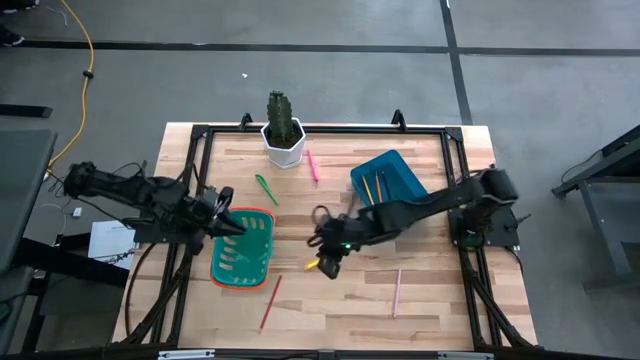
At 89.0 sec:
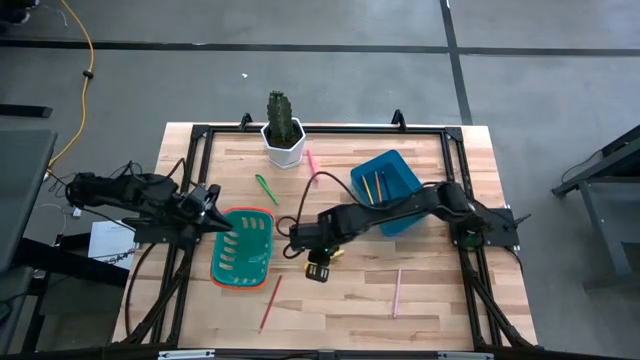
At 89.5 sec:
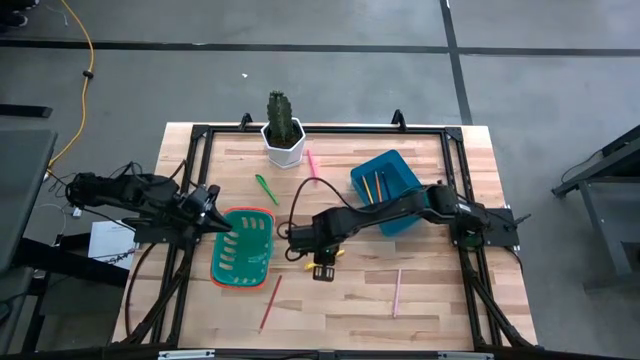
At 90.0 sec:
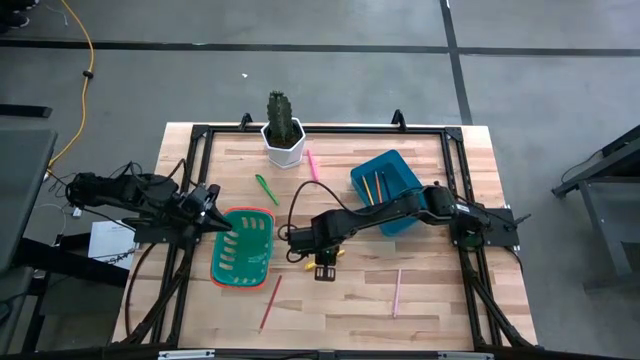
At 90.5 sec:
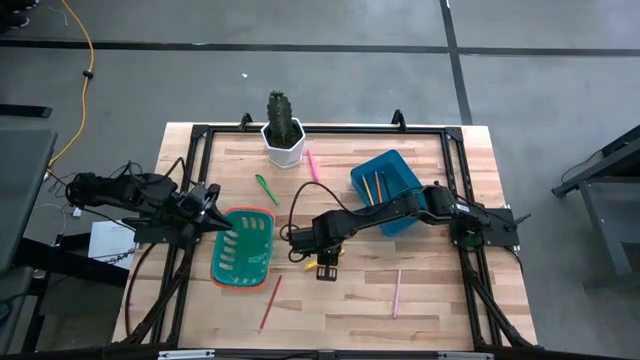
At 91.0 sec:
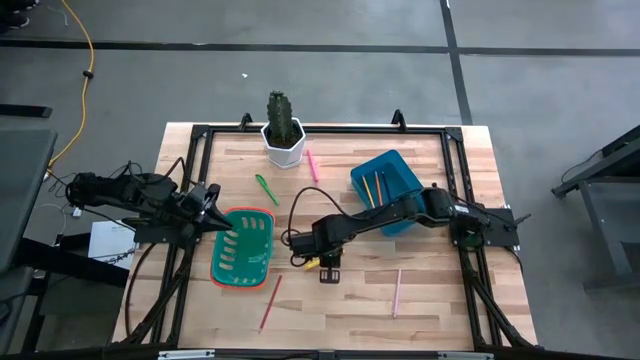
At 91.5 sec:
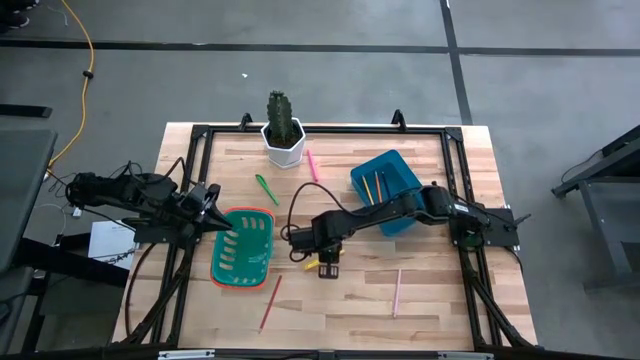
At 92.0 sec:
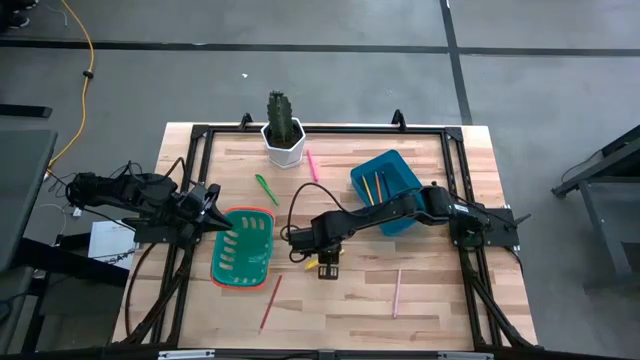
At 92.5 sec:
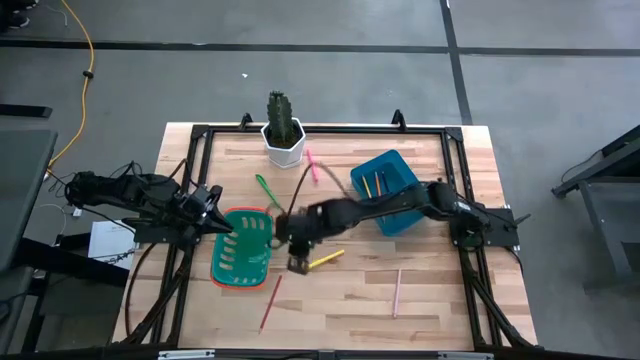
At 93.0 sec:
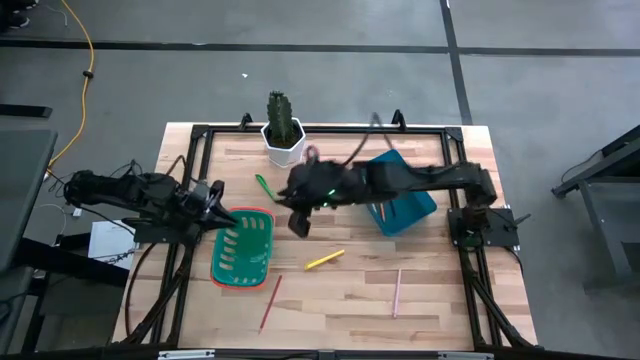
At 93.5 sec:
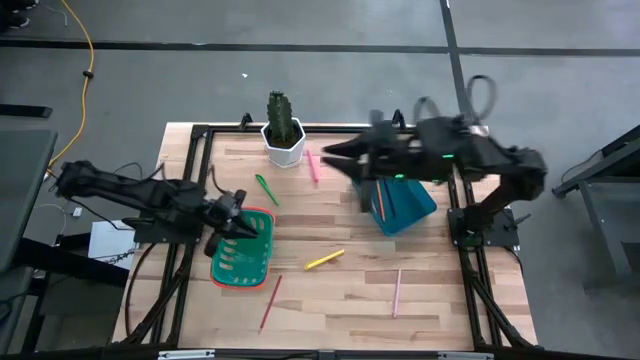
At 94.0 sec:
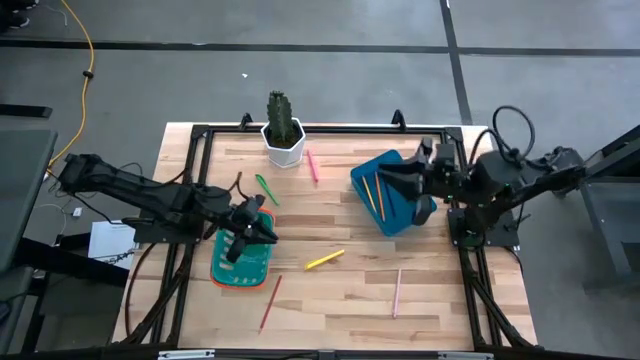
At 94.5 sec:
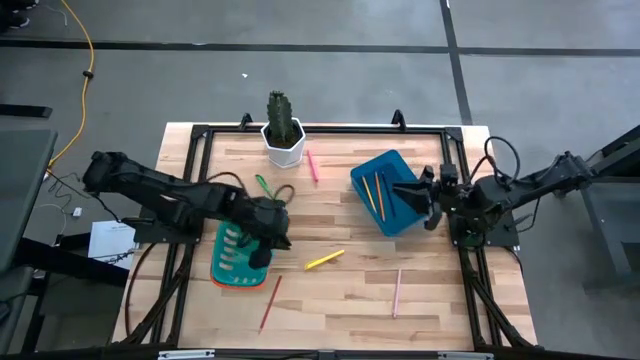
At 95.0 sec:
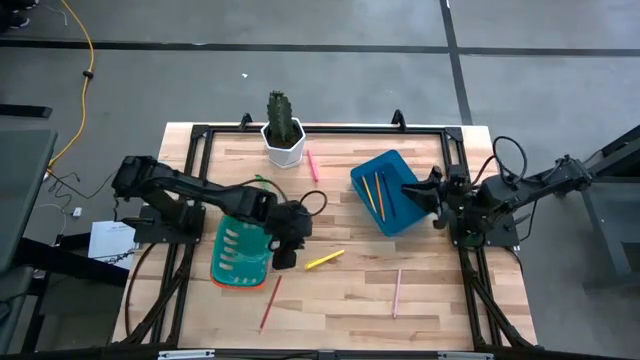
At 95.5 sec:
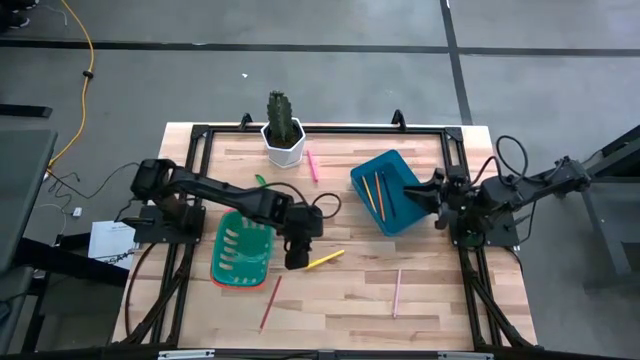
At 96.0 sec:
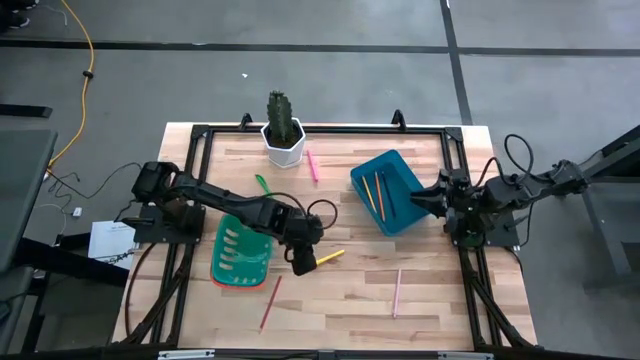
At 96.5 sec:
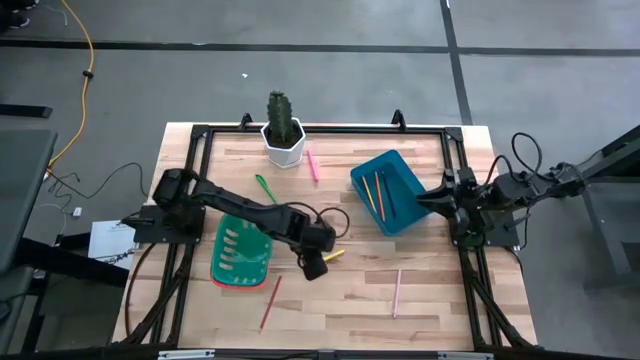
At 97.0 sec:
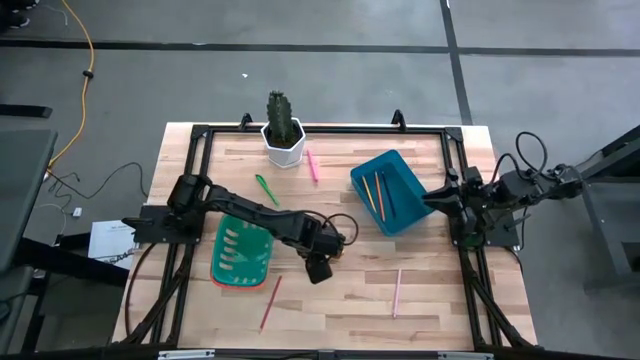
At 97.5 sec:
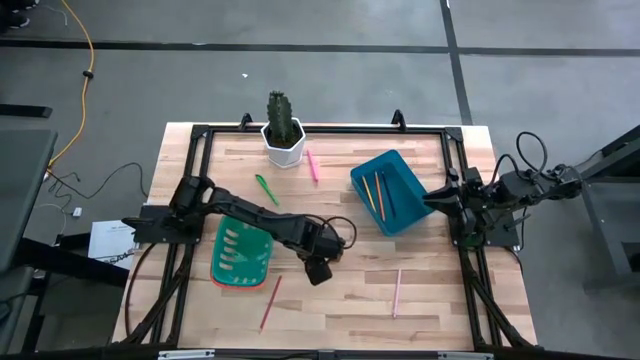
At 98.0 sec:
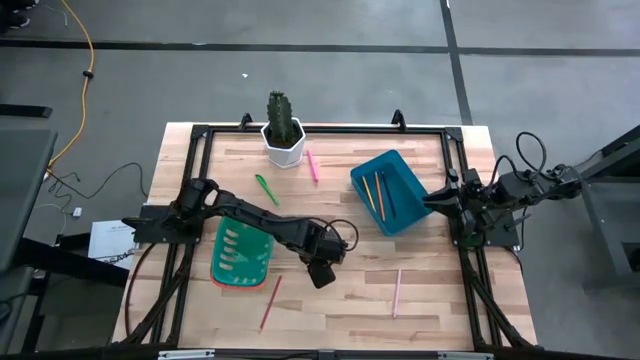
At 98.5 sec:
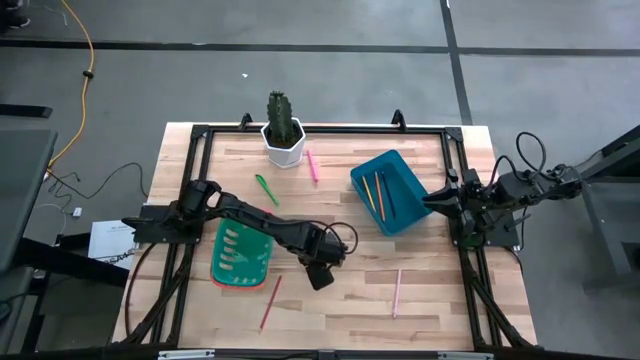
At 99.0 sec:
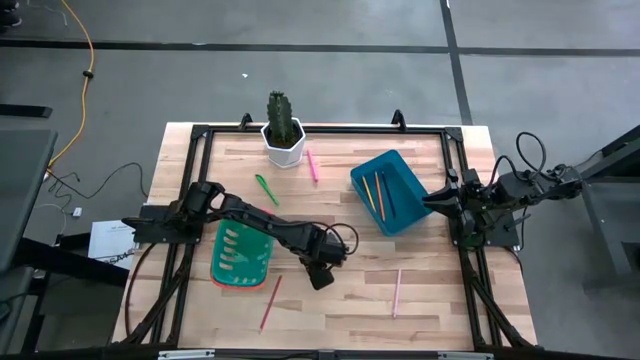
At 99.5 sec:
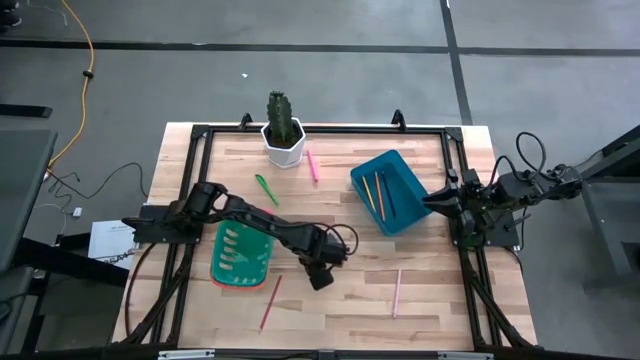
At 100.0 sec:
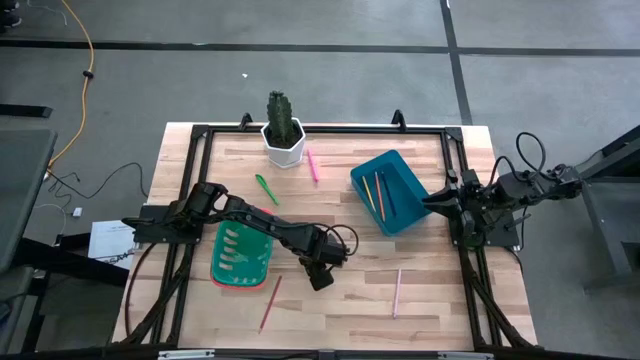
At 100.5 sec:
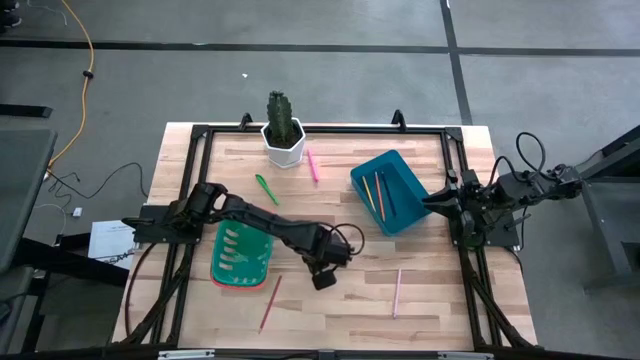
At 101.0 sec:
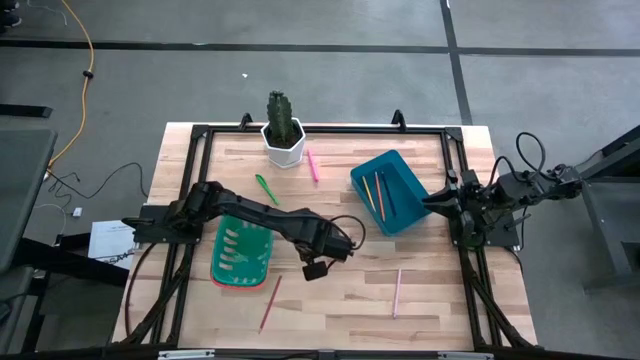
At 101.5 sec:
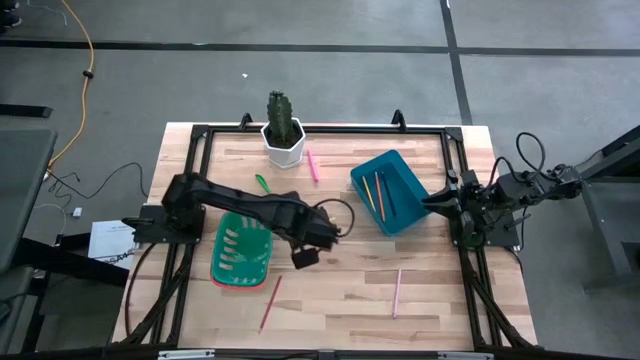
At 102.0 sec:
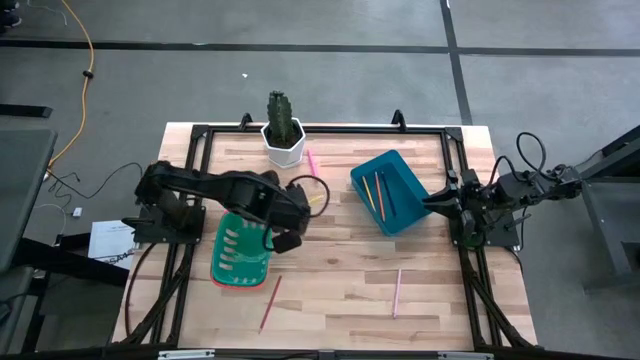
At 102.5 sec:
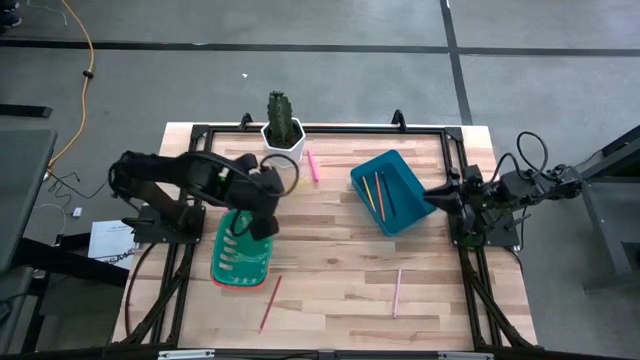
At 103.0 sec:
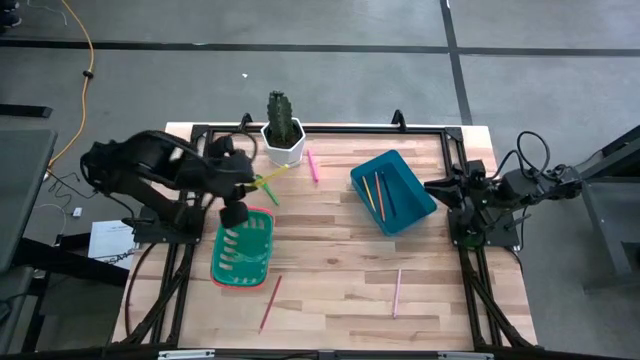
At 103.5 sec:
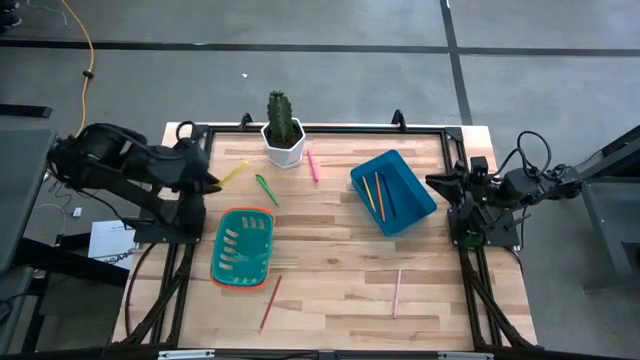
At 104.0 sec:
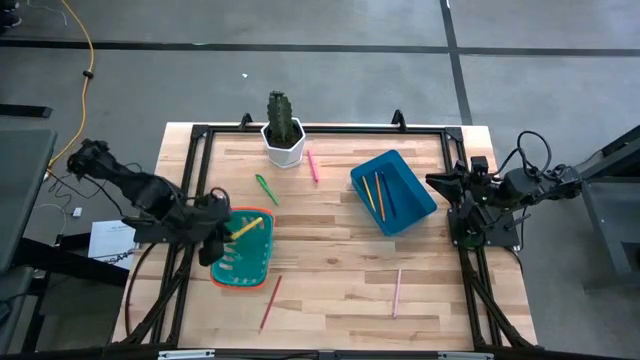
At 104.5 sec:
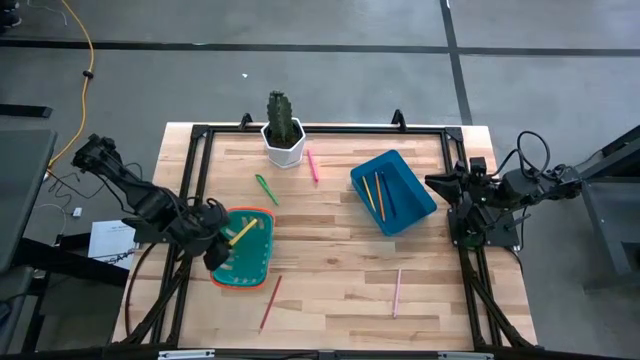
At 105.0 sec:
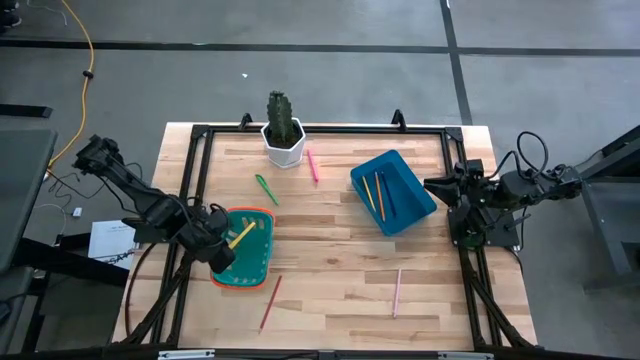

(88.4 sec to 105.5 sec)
Task: Sort pens & pencils
Put the yellow pen into the green basket
